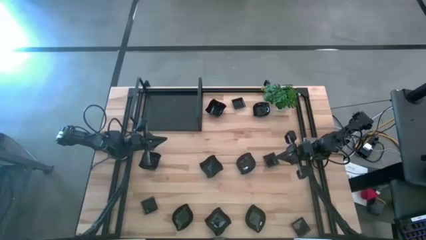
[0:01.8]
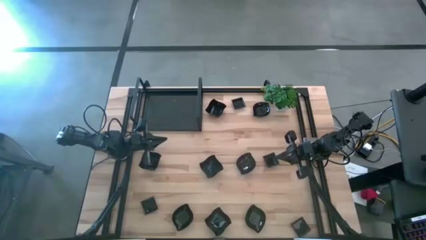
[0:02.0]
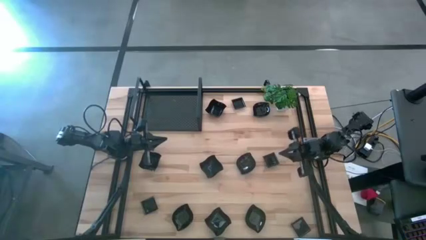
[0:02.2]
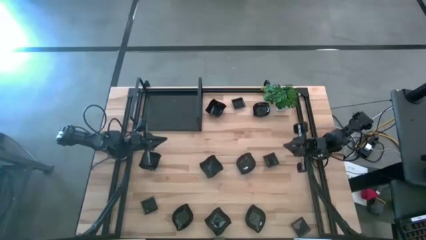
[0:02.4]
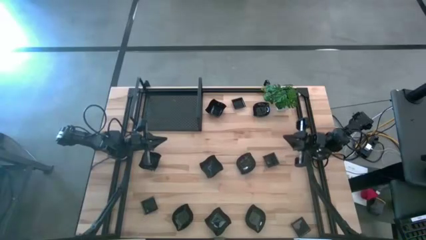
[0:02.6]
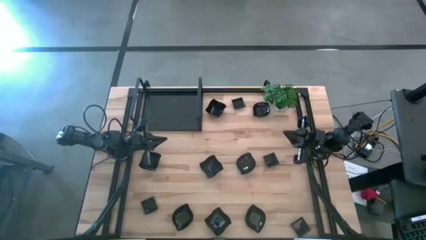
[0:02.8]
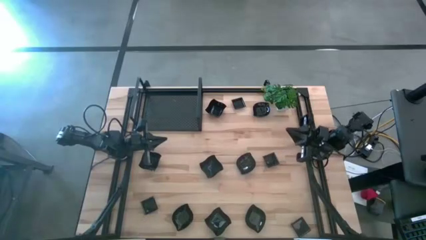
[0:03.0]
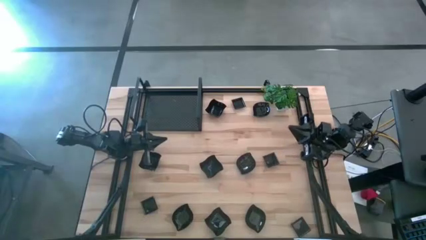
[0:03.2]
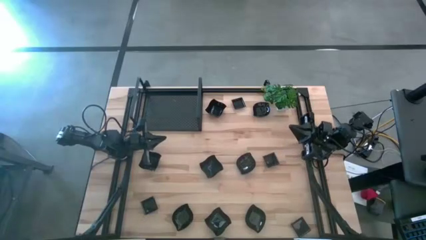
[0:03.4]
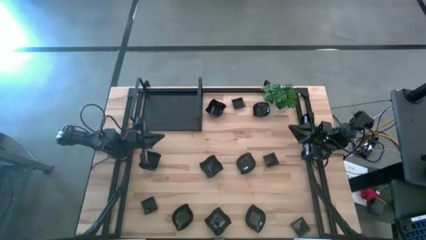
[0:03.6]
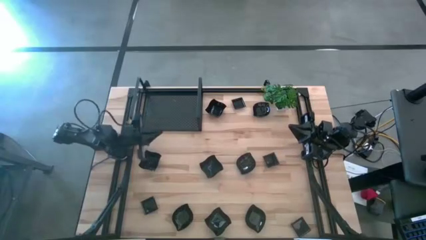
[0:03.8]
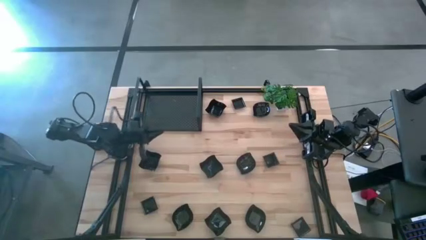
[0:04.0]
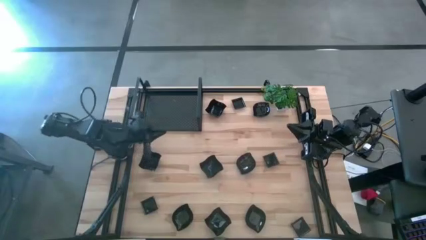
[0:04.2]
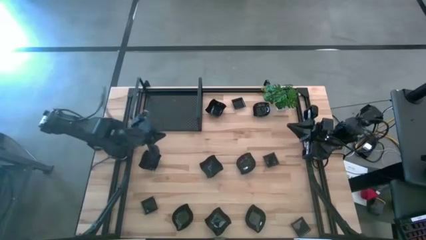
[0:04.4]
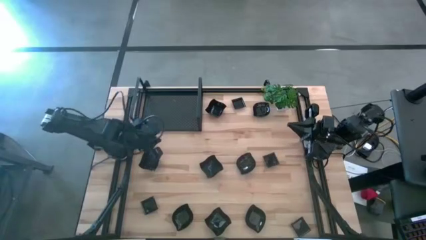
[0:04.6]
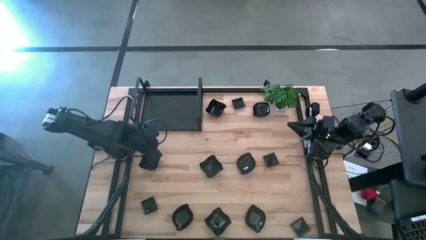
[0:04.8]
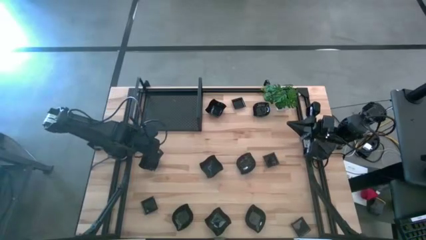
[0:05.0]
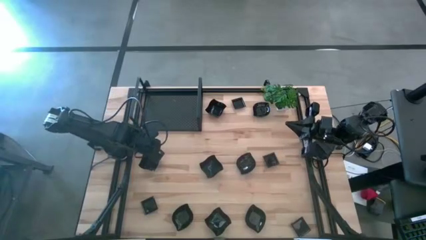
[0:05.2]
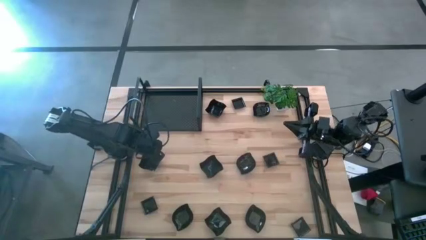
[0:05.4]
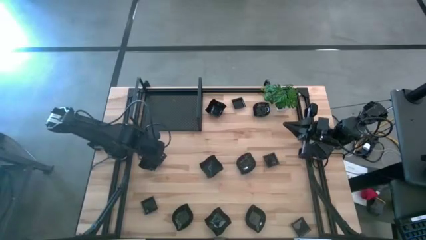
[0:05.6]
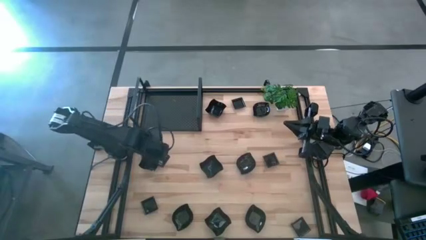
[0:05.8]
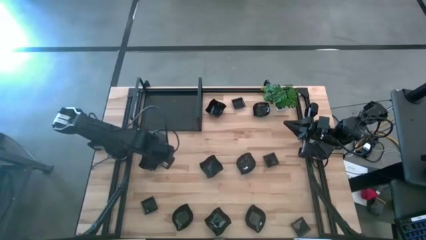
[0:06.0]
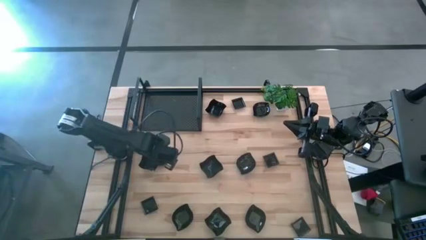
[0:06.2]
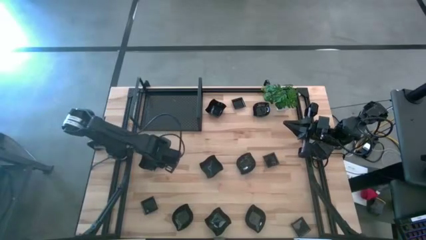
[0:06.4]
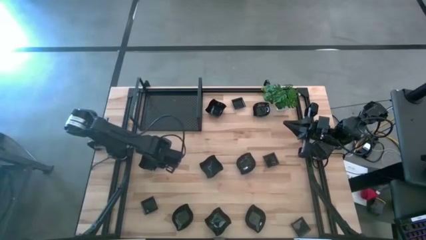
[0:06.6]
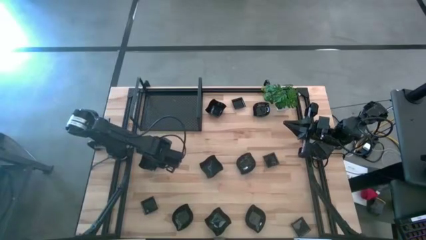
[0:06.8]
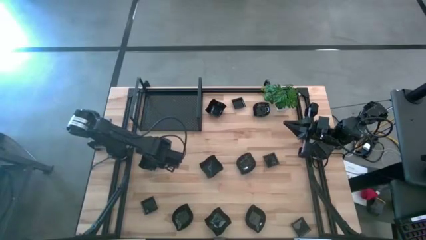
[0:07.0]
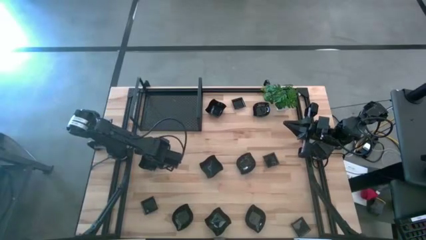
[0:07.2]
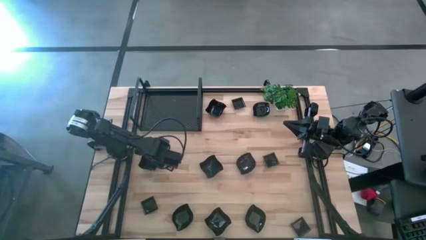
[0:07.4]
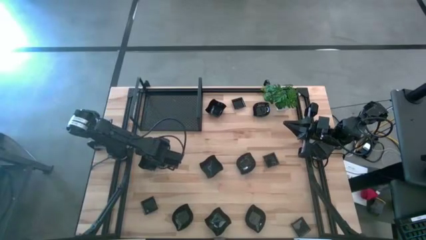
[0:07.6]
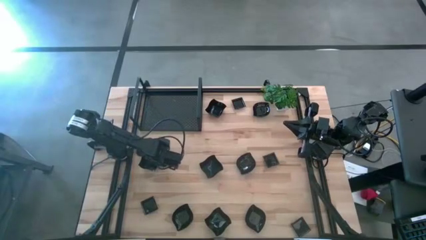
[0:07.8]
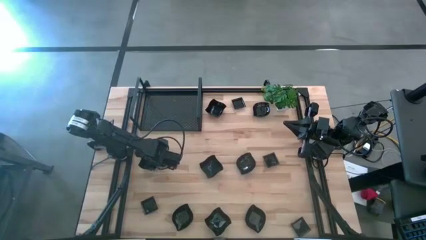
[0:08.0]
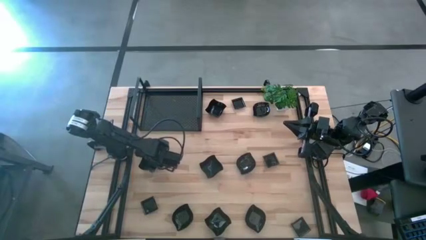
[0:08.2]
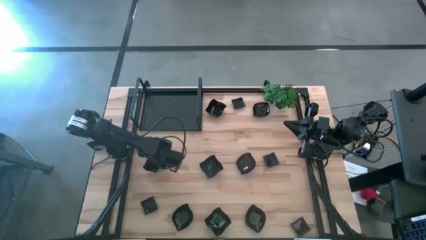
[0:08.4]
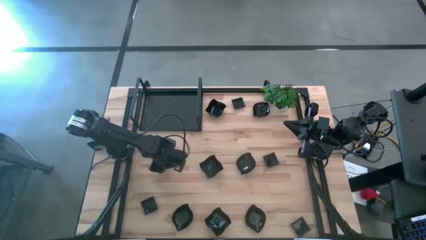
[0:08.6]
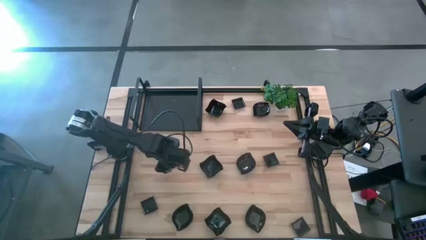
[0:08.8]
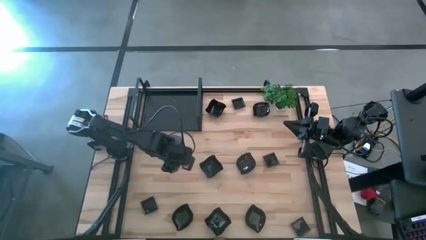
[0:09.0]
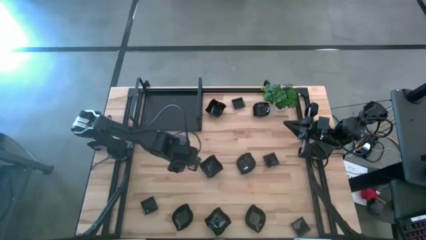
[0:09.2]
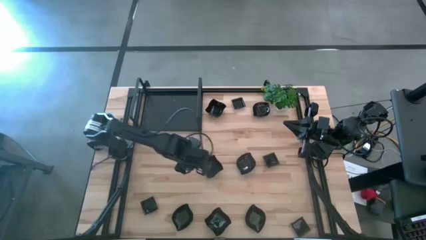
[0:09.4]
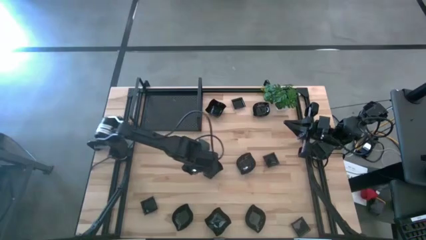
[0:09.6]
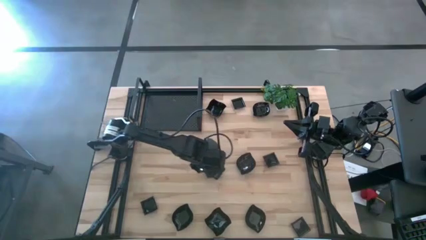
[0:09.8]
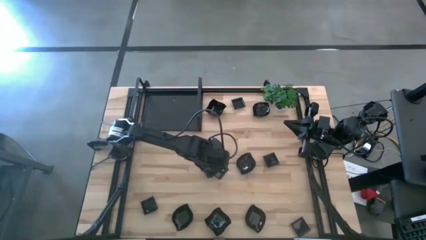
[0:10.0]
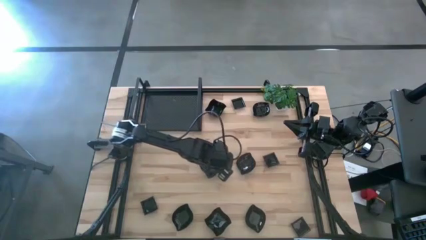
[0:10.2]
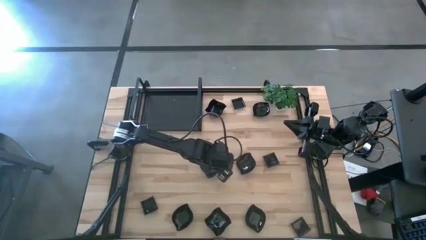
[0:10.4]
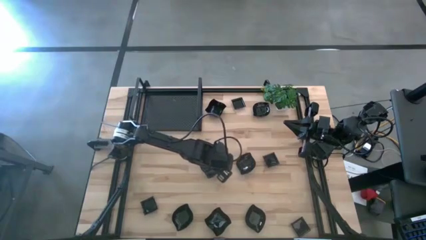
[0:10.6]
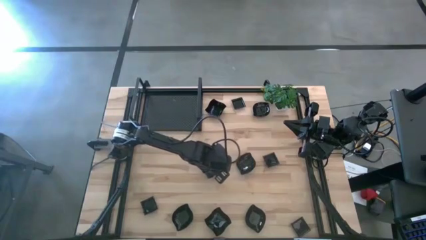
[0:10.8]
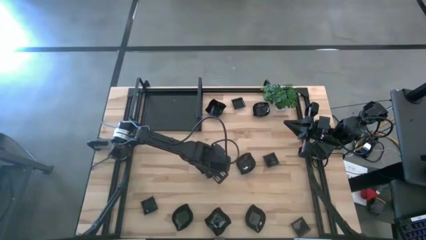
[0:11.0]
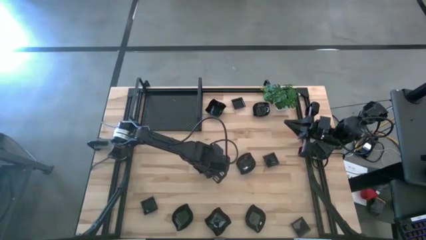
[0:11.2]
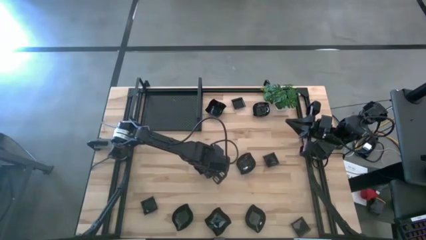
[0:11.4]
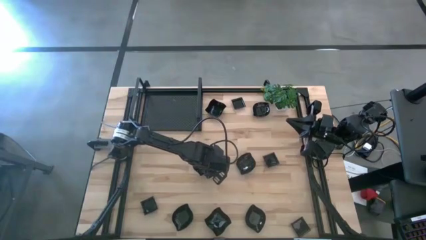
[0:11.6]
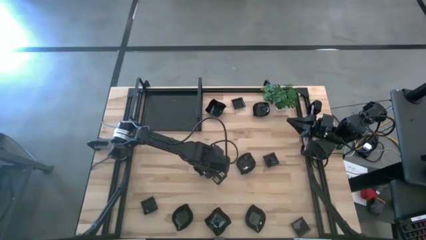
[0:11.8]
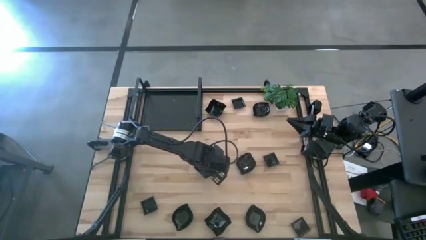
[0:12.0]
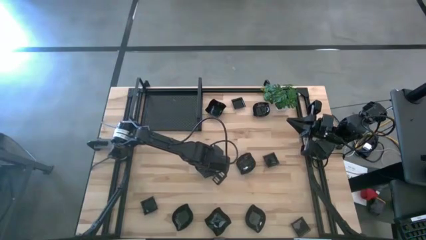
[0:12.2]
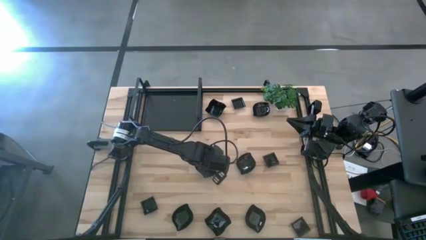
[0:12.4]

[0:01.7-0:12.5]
Task: Pick & Place Mini shaped plates
Stack the black distorted square plate on top of the black distorted square plate on the table

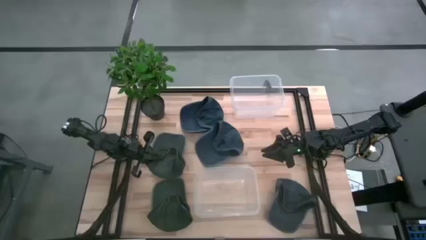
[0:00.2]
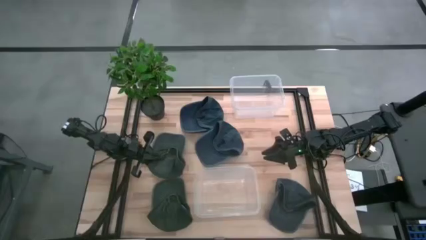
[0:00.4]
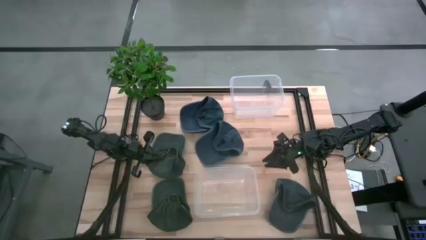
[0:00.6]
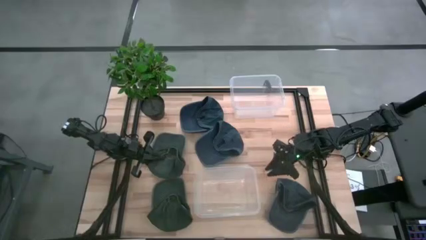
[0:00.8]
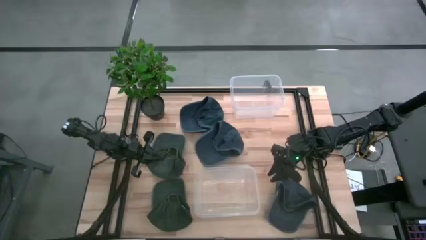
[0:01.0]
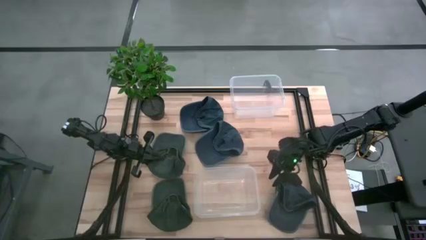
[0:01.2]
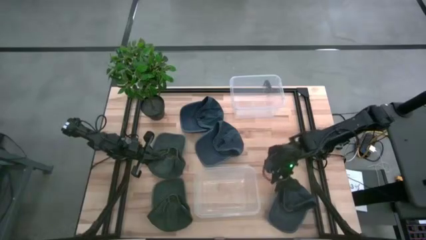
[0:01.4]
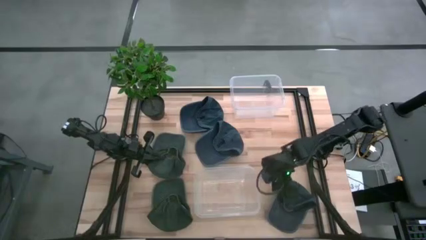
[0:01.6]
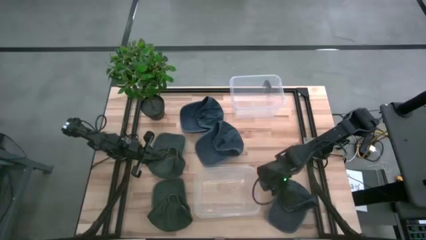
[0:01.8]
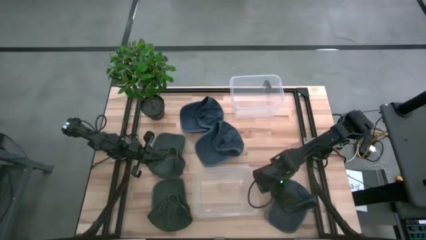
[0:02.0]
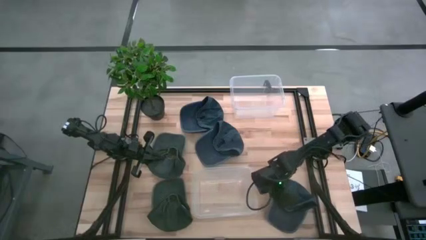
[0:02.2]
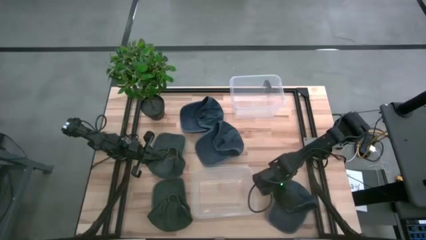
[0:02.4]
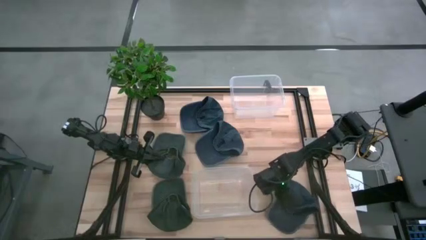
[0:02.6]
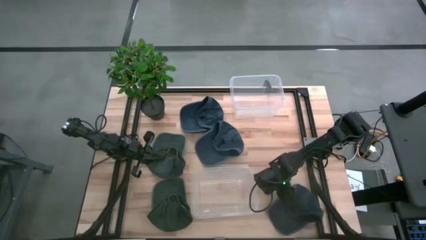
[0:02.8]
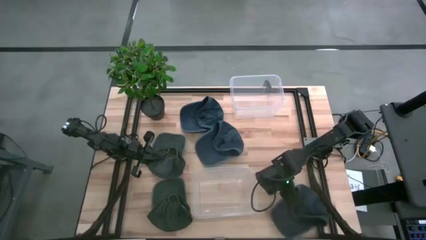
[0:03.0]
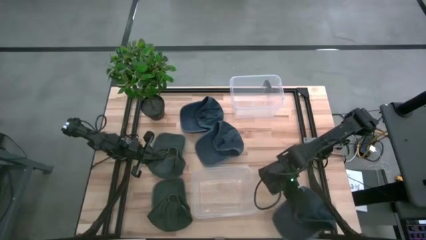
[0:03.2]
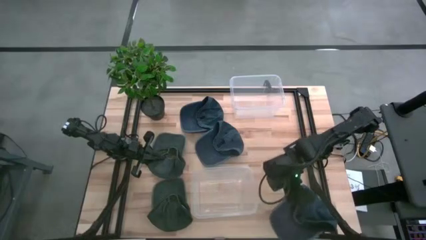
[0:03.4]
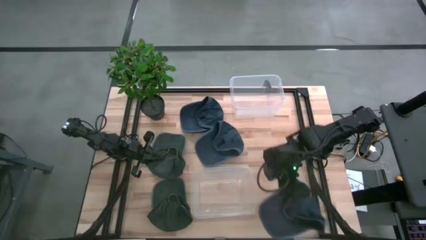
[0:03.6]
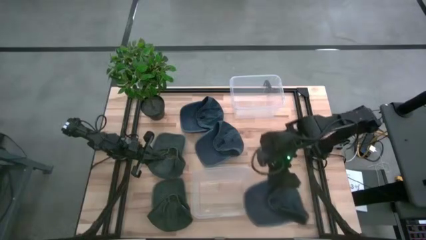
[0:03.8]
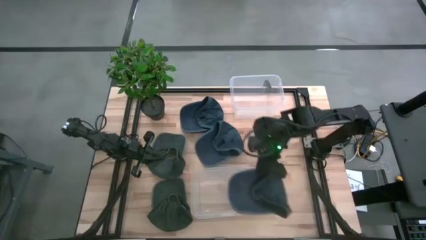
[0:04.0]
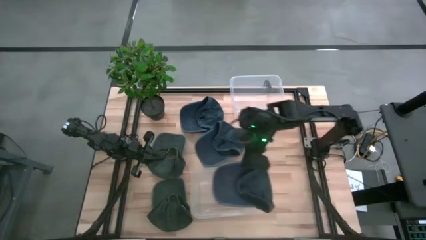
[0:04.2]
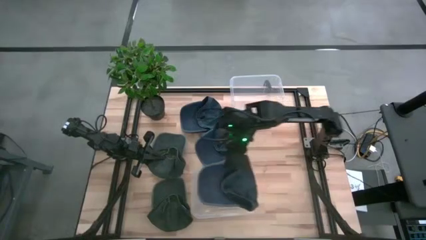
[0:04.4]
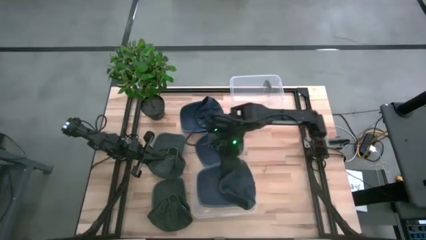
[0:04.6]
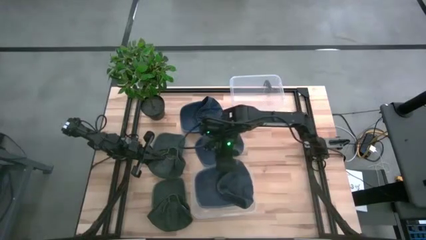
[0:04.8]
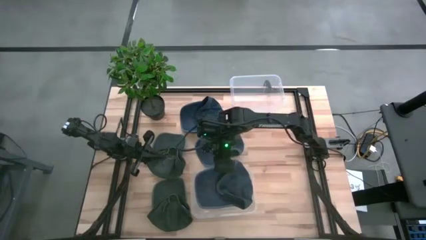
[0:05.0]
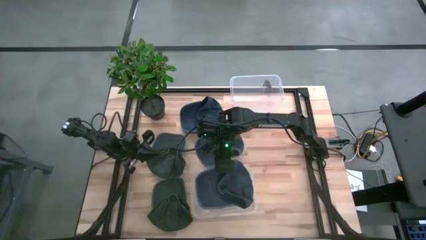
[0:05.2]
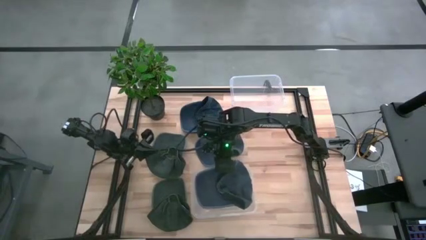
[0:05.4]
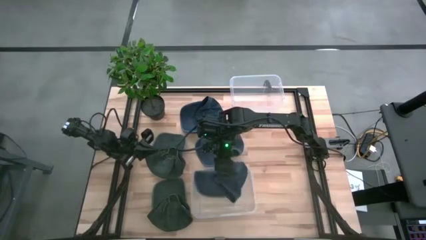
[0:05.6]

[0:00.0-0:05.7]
Task: Pick & Place hat
Put the bottom blue cap into the bottom transparent bin
